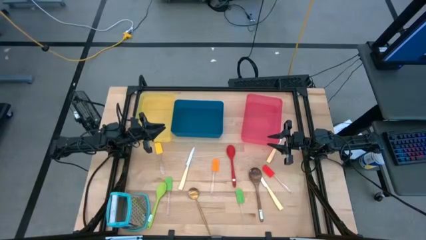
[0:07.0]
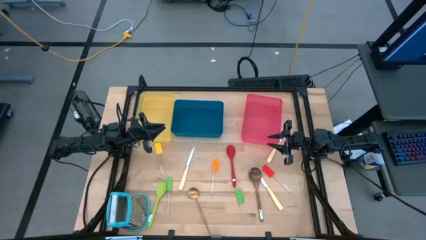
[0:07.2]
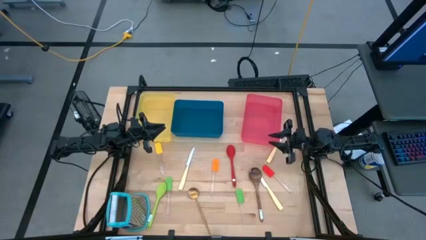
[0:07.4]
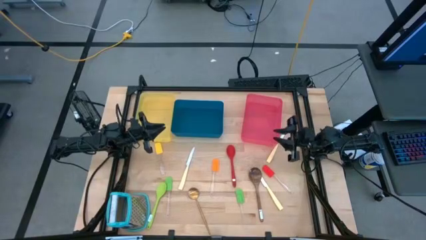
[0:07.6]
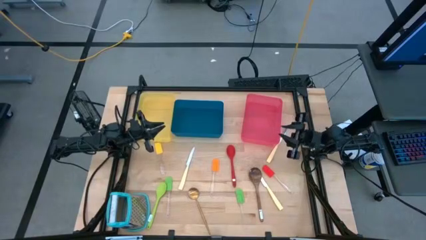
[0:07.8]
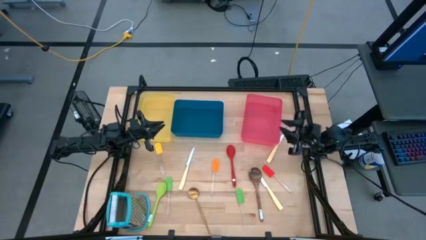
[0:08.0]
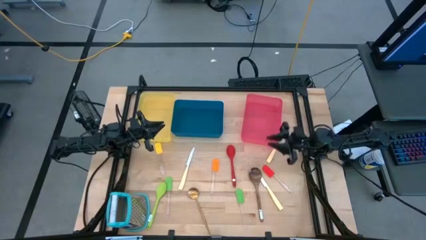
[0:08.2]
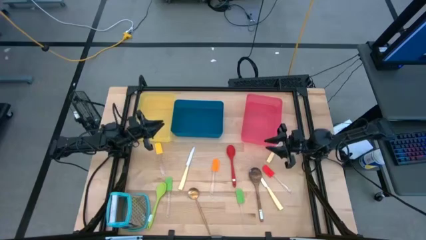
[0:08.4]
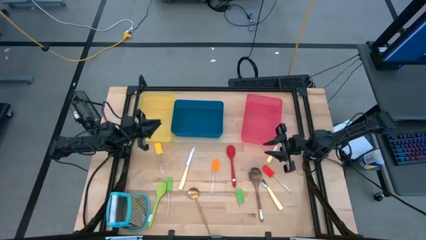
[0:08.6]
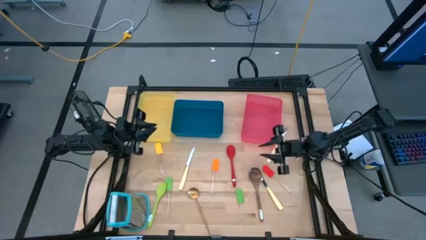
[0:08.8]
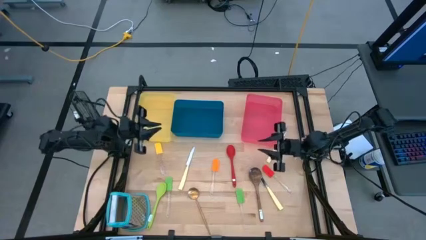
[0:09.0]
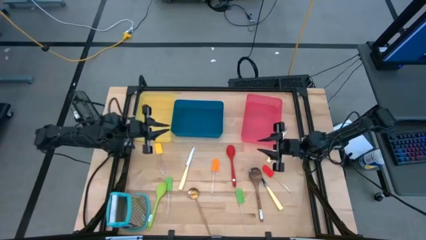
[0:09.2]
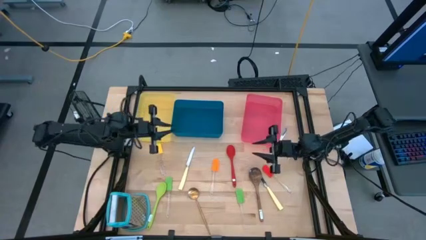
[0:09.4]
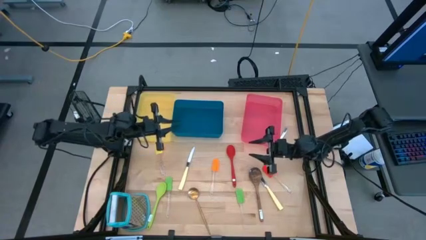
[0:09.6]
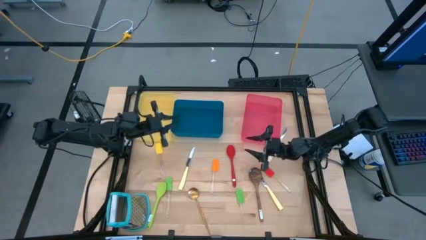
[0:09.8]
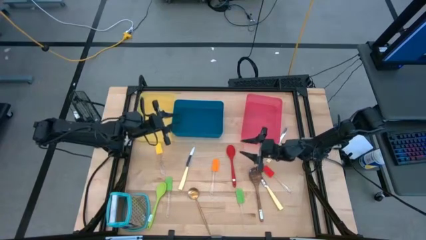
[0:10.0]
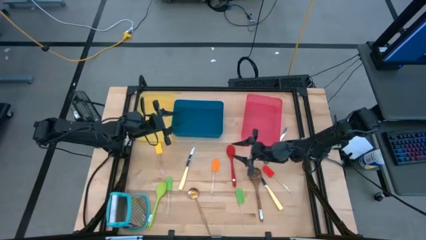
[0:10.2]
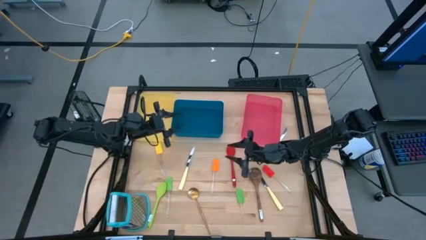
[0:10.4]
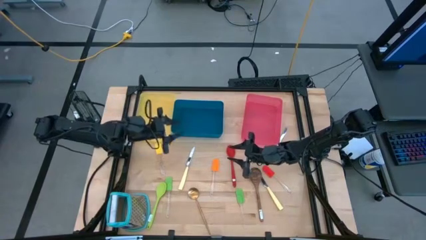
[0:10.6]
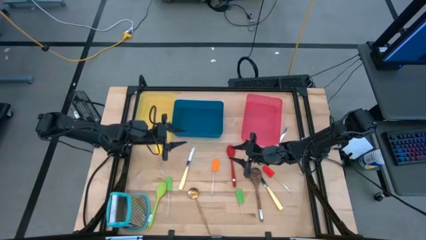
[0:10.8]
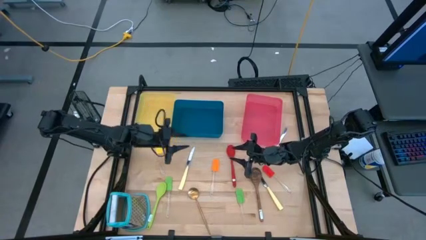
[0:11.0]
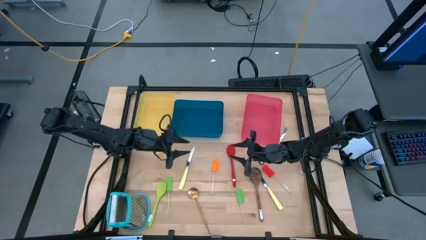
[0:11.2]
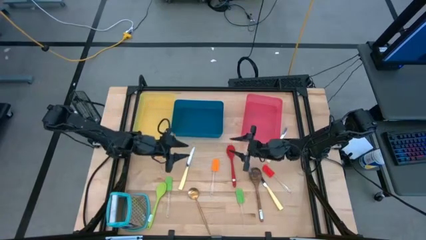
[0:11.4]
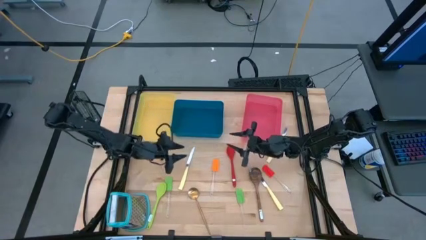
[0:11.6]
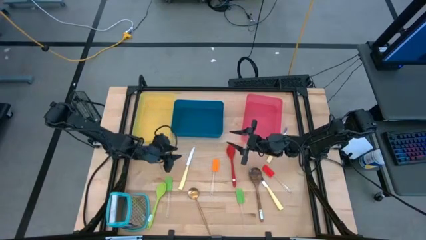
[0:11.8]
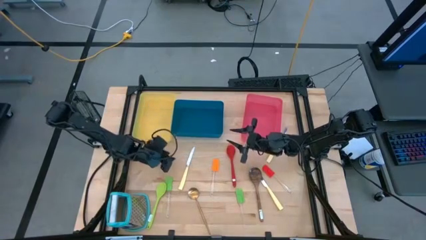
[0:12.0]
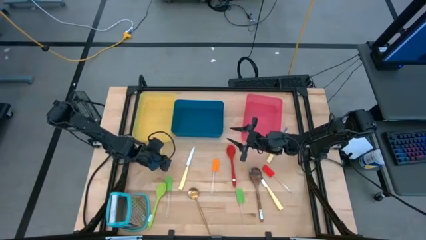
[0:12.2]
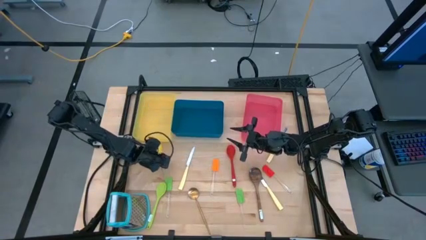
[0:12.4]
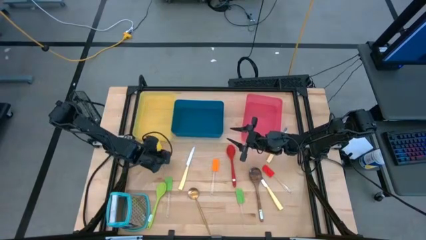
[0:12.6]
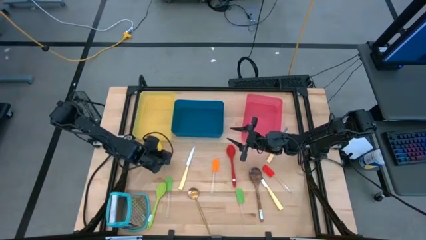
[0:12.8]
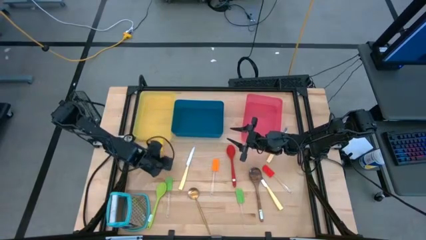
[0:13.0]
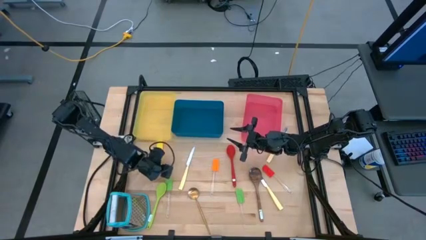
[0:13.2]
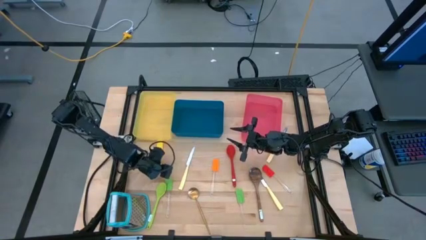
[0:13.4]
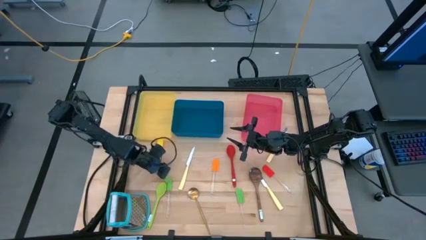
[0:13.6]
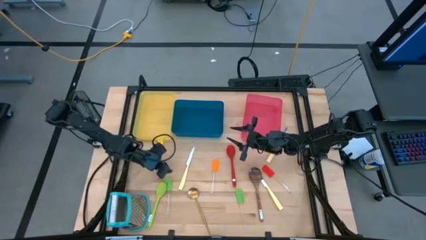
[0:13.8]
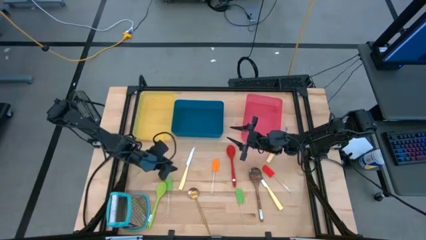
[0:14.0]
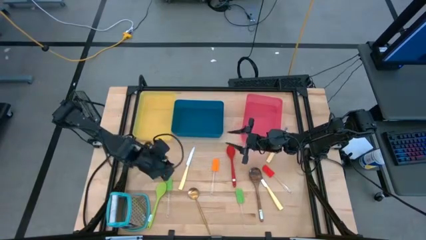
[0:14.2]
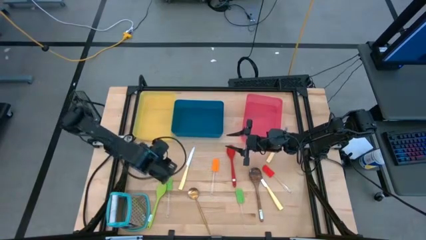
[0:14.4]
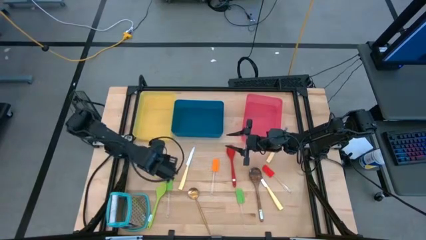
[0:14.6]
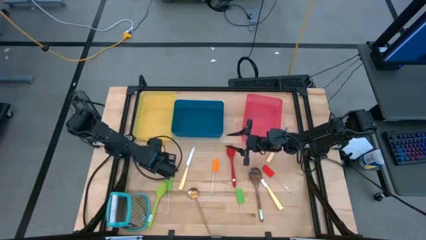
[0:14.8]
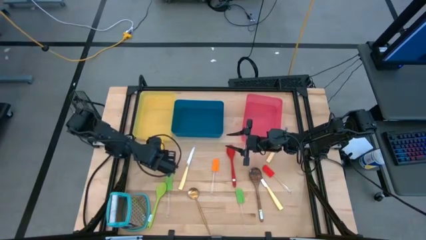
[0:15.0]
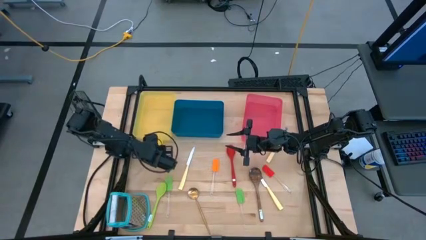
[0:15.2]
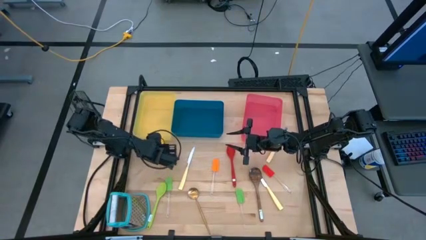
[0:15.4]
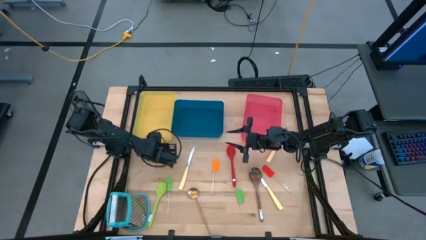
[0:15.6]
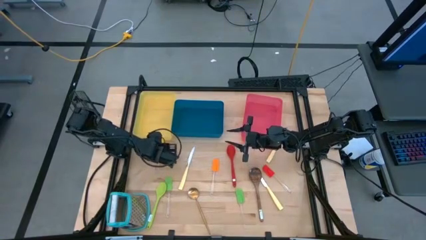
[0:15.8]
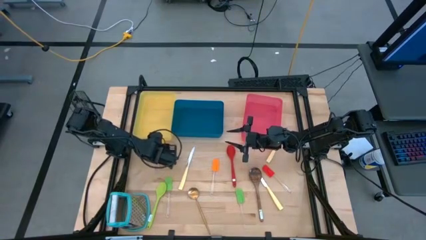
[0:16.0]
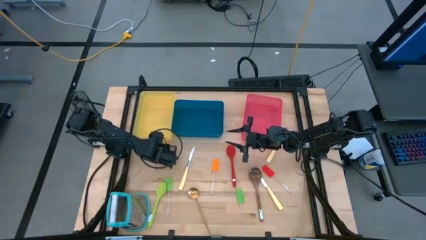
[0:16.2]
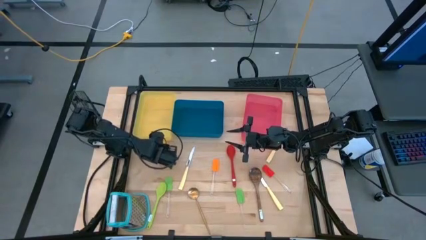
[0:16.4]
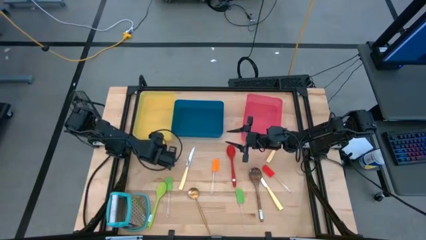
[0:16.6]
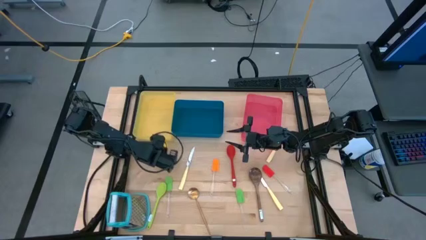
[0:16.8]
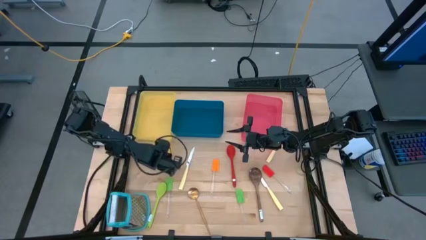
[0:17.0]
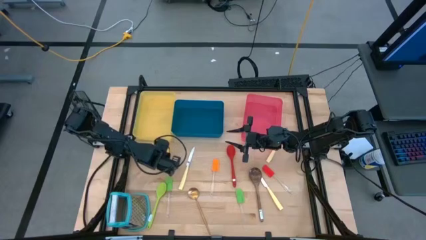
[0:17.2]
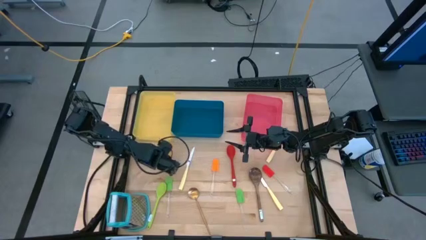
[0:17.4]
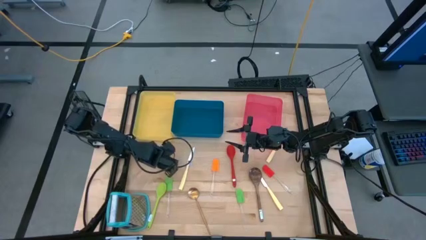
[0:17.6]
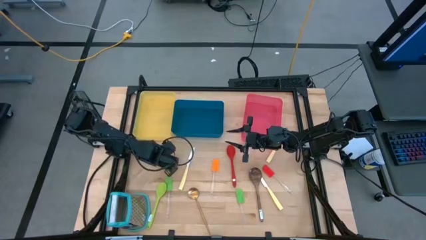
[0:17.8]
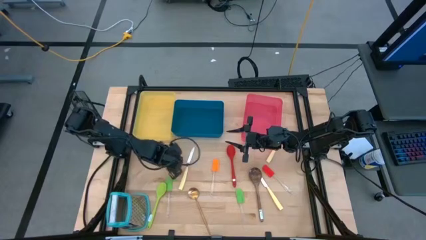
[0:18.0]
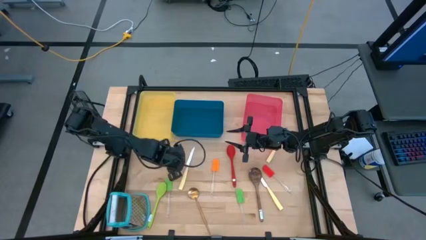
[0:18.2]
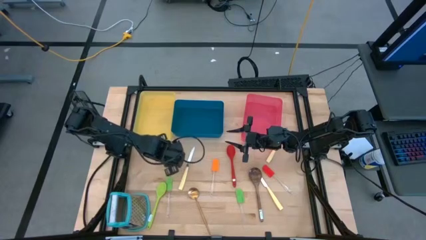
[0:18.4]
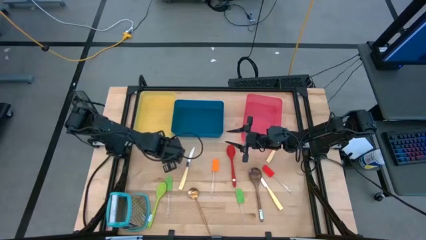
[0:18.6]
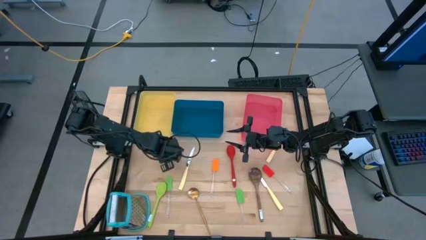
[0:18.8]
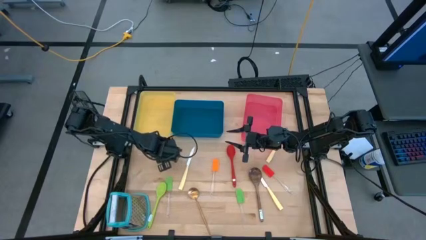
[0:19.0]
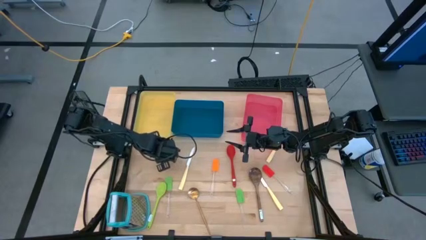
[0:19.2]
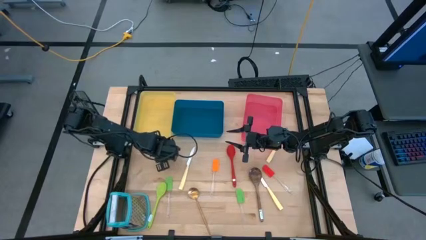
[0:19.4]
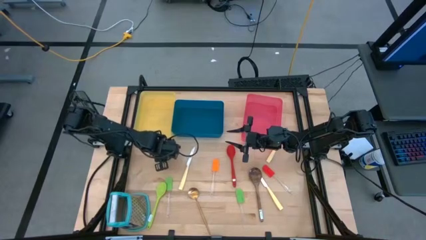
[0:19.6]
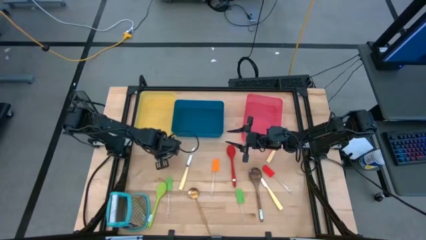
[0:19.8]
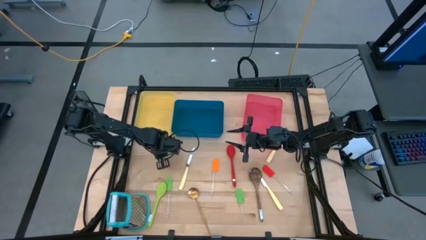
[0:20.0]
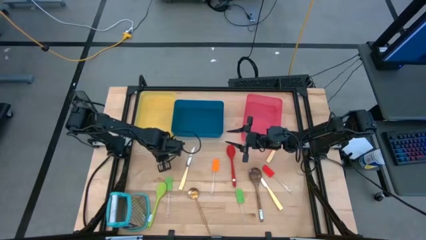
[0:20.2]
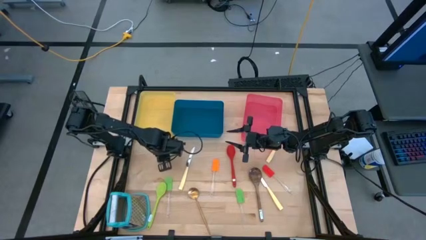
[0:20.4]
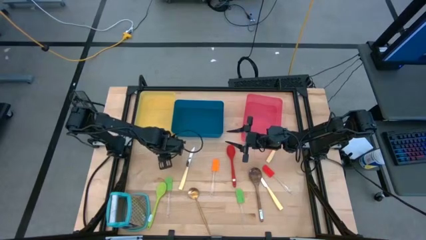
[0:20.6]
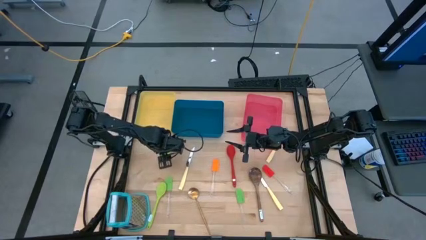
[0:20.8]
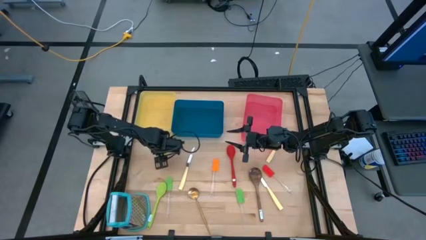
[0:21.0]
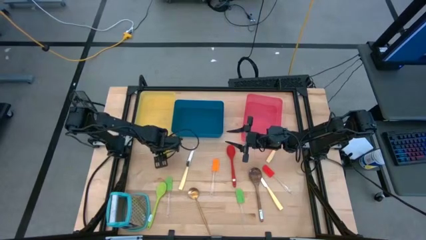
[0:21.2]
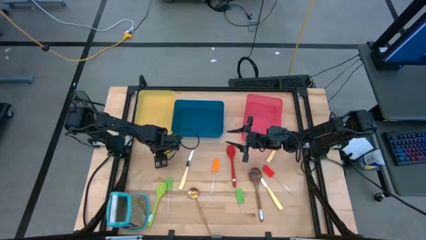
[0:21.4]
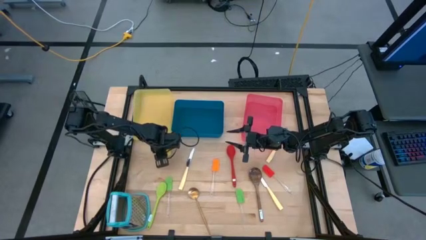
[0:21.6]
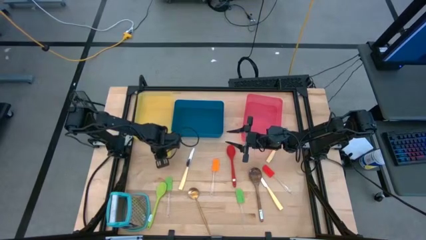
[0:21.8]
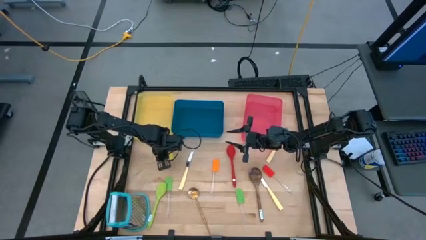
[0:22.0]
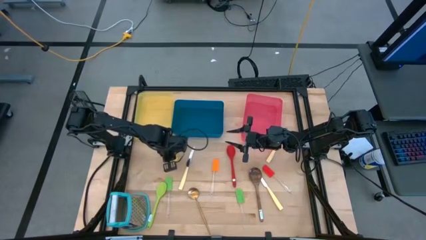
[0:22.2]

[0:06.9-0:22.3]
Task: Pick & Place Kitchen Items
Put the yellow spatula into the blue bin

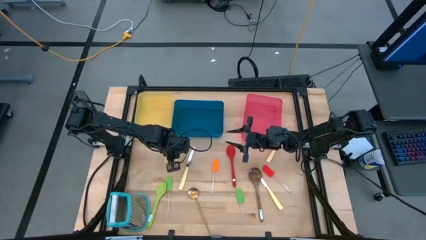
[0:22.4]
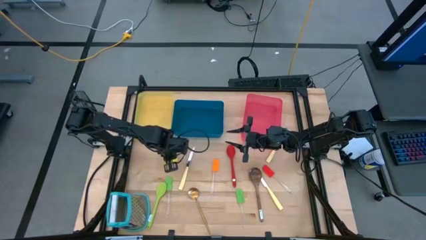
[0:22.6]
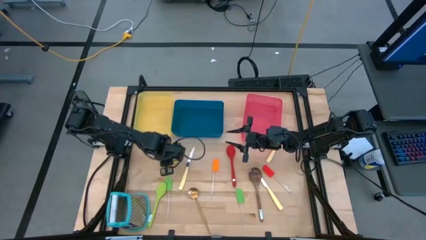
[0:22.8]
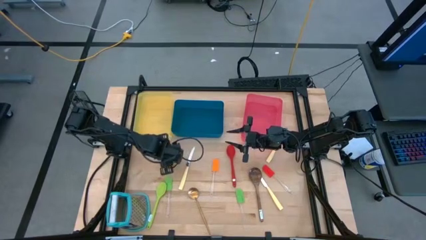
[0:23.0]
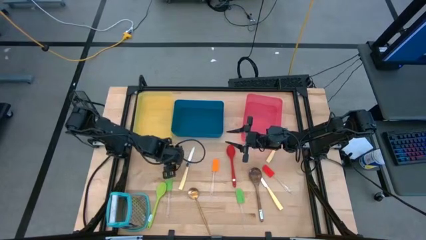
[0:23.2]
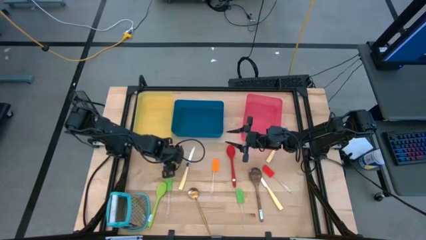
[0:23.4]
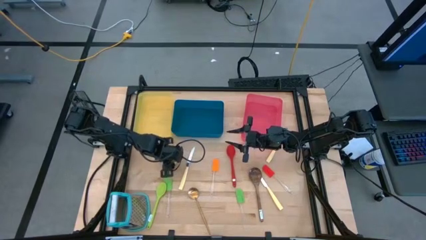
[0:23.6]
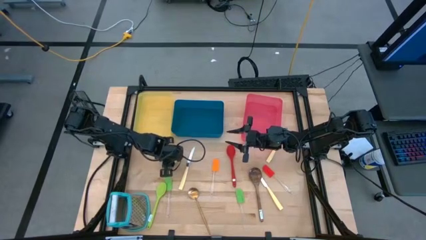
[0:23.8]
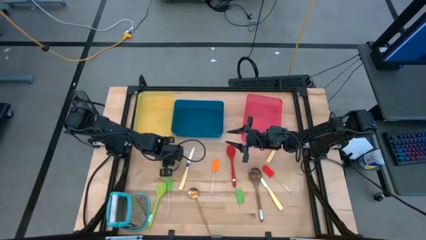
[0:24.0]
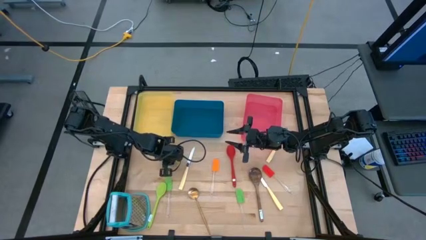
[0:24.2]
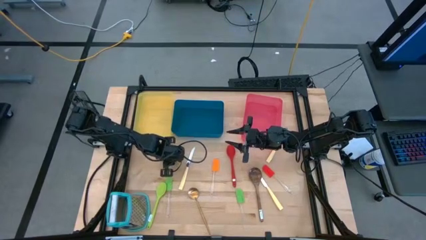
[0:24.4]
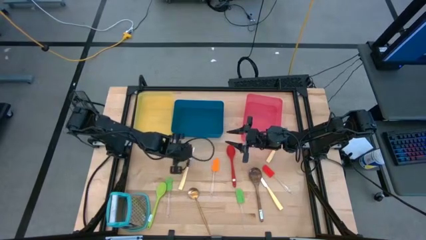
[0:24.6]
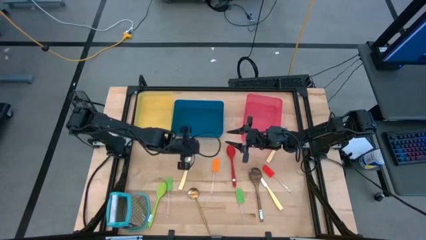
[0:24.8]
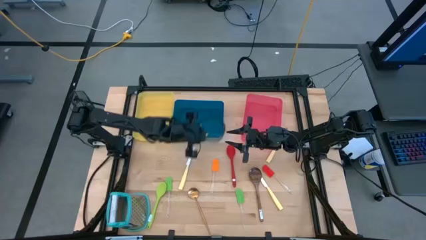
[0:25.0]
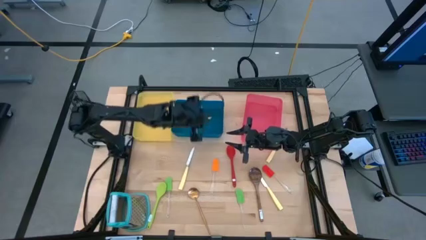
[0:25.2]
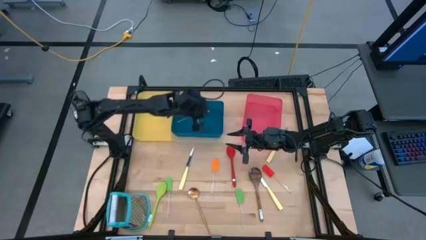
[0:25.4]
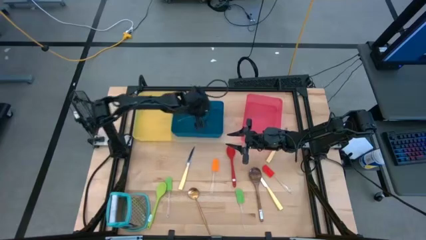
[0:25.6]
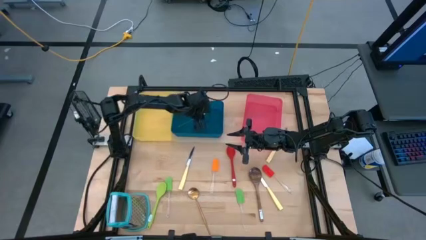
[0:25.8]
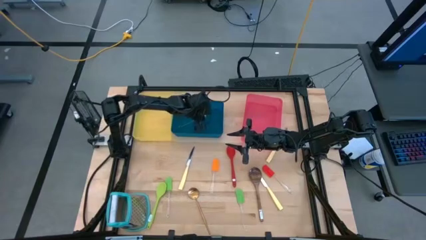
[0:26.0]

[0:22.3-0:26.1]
Put the yellow spatula into the blue bin
